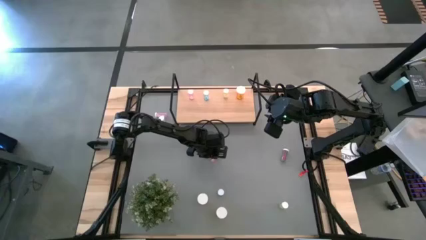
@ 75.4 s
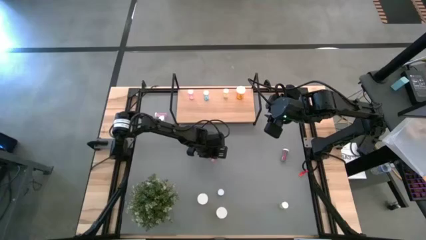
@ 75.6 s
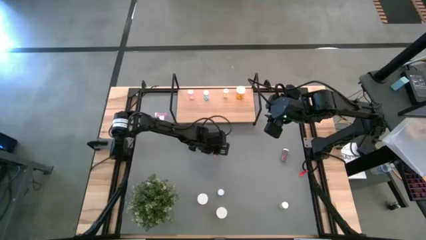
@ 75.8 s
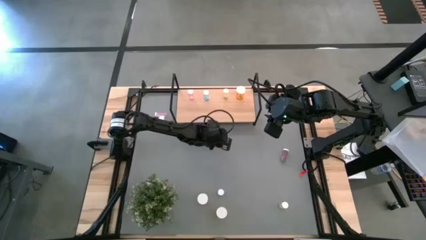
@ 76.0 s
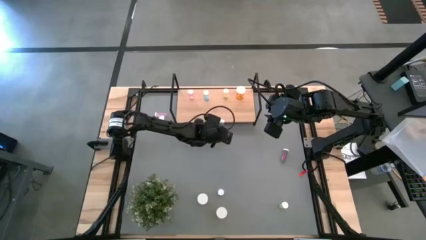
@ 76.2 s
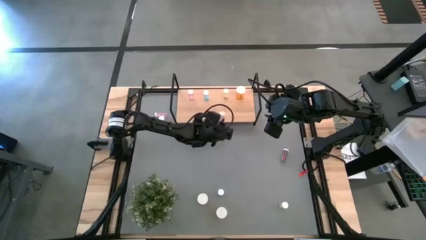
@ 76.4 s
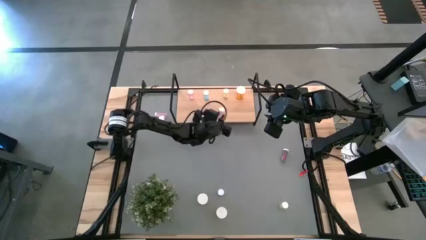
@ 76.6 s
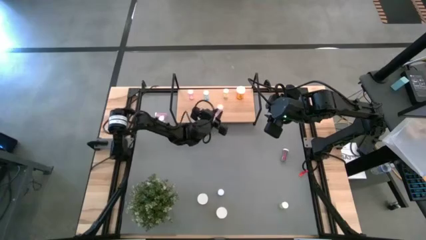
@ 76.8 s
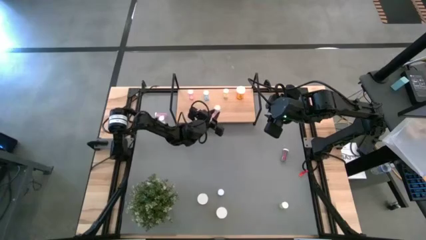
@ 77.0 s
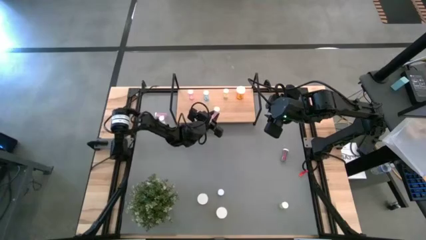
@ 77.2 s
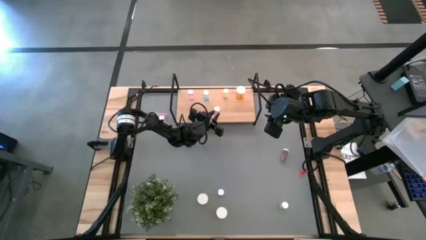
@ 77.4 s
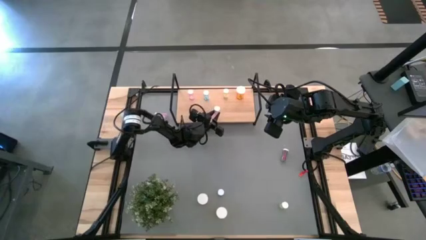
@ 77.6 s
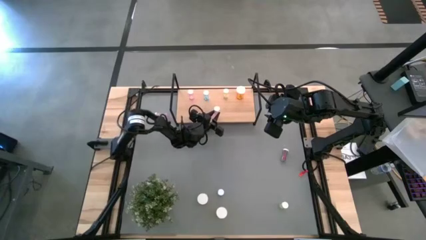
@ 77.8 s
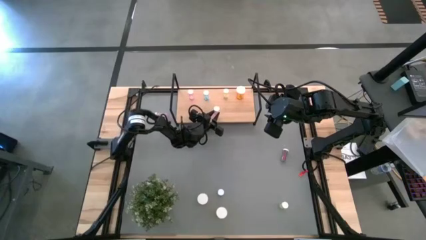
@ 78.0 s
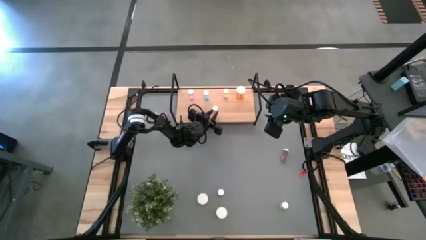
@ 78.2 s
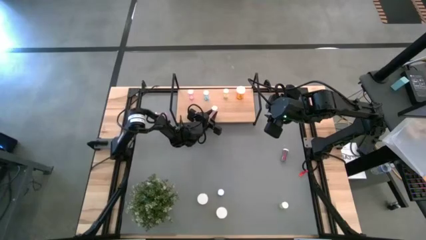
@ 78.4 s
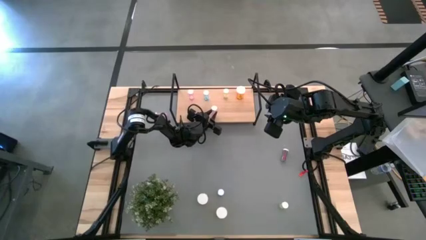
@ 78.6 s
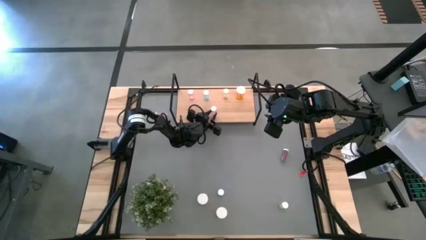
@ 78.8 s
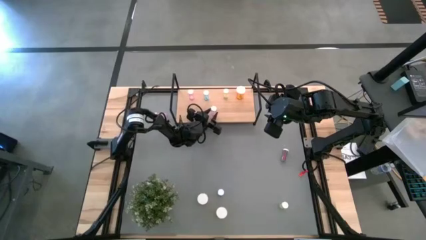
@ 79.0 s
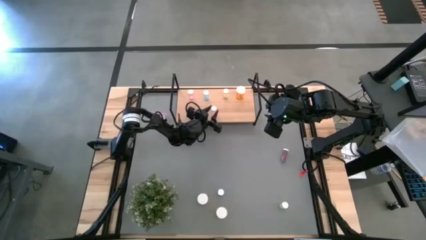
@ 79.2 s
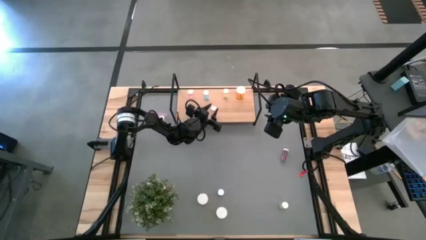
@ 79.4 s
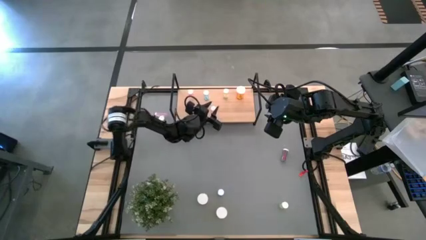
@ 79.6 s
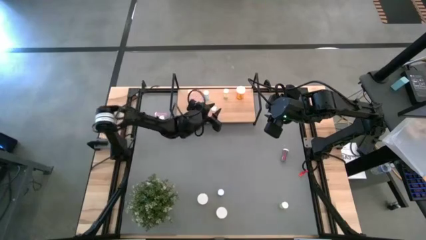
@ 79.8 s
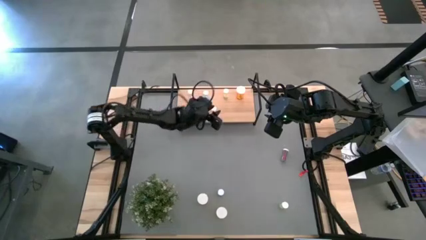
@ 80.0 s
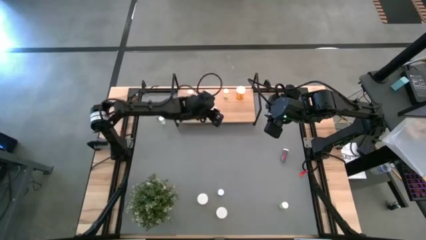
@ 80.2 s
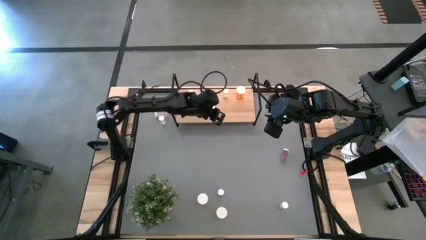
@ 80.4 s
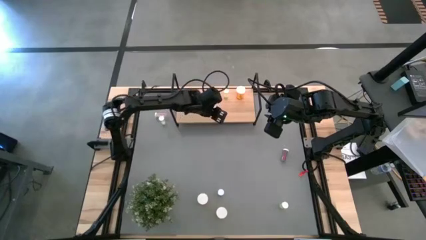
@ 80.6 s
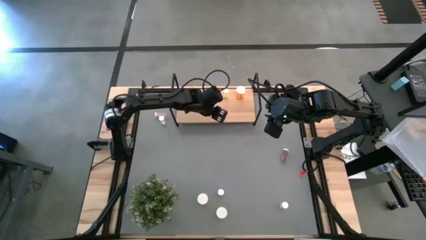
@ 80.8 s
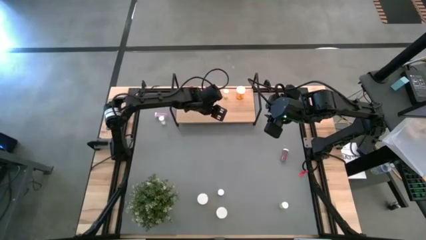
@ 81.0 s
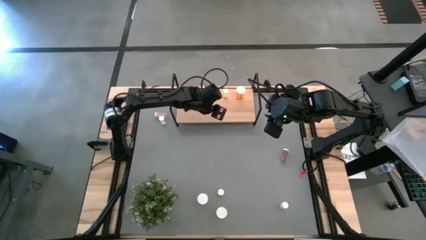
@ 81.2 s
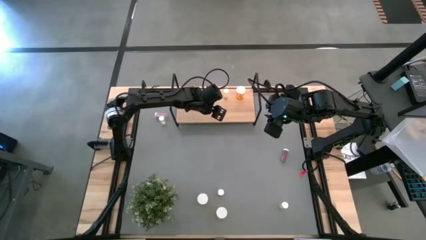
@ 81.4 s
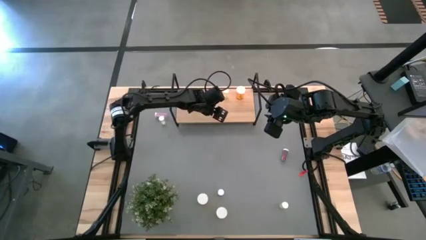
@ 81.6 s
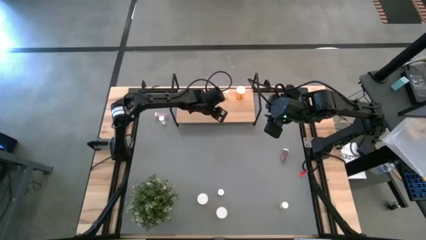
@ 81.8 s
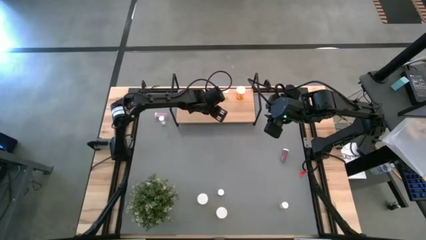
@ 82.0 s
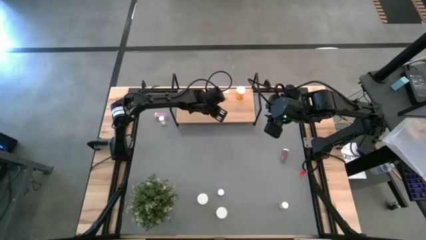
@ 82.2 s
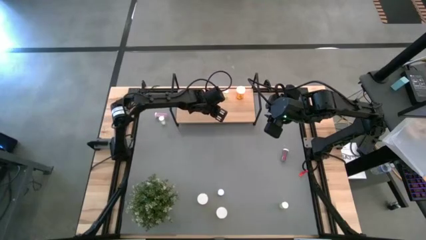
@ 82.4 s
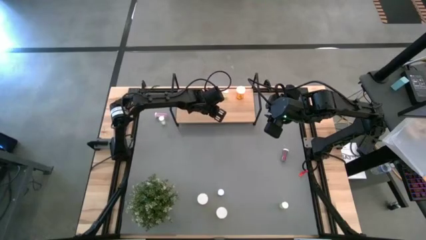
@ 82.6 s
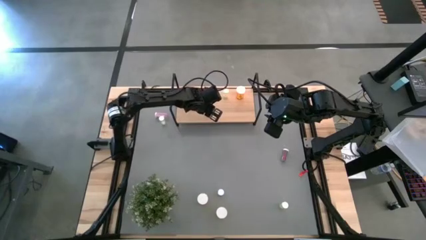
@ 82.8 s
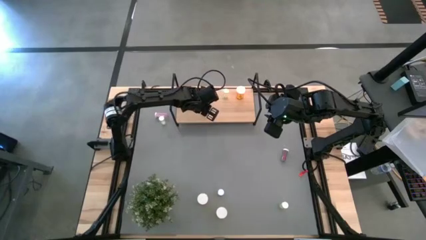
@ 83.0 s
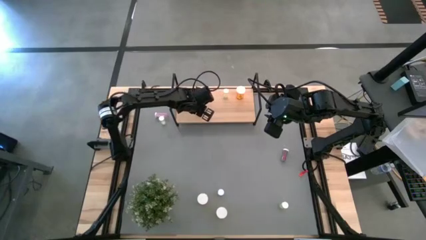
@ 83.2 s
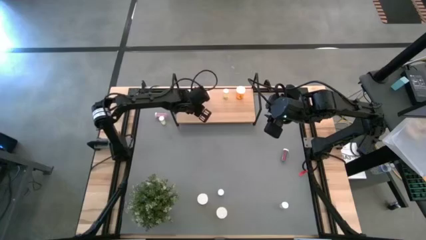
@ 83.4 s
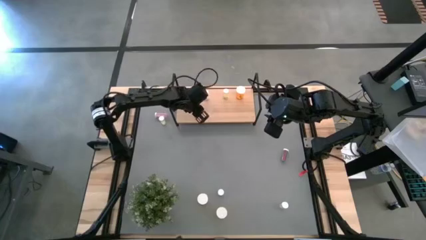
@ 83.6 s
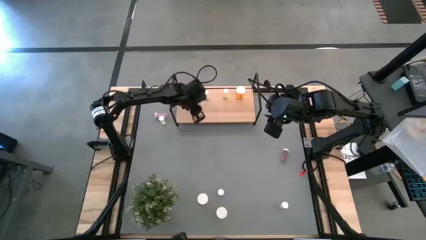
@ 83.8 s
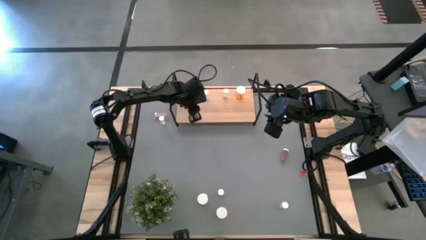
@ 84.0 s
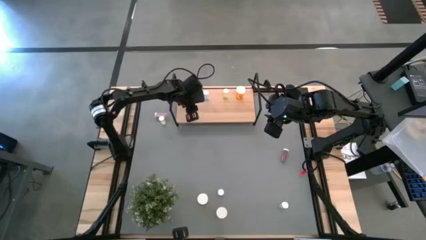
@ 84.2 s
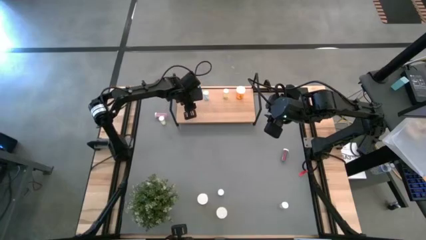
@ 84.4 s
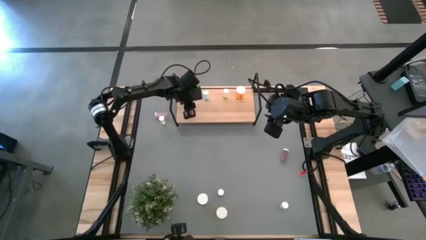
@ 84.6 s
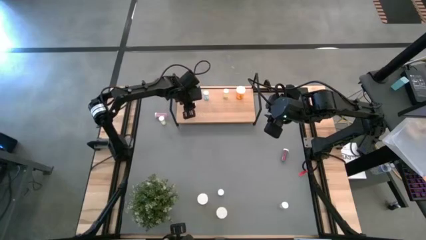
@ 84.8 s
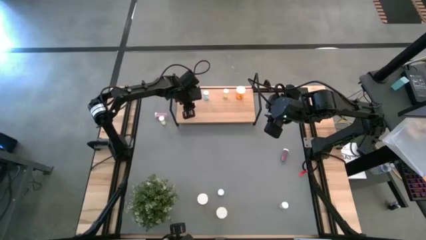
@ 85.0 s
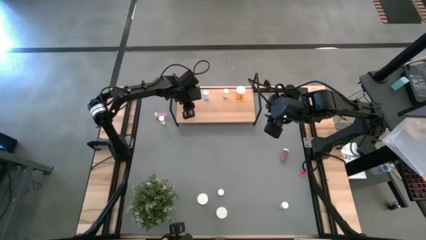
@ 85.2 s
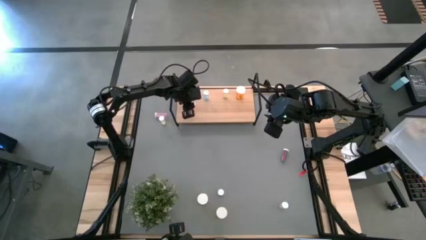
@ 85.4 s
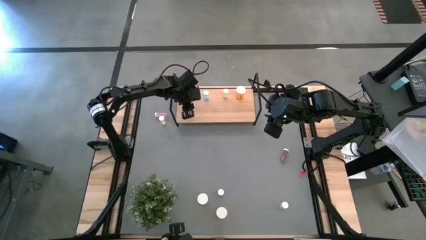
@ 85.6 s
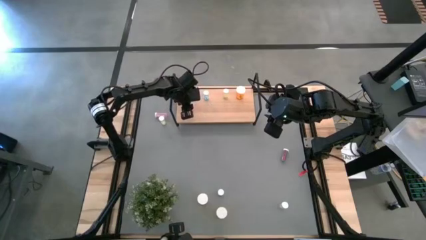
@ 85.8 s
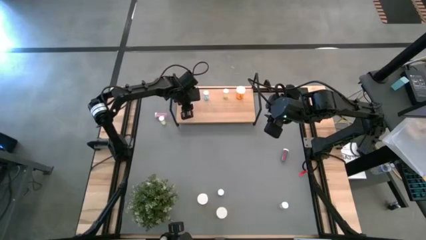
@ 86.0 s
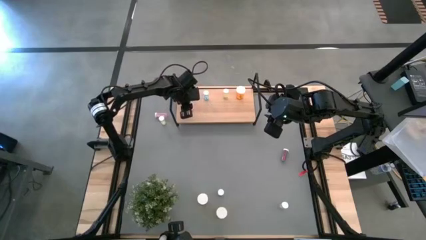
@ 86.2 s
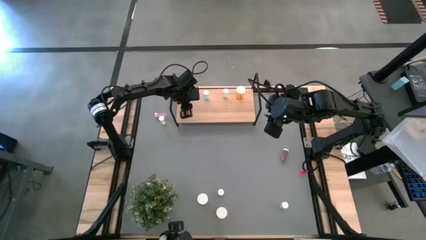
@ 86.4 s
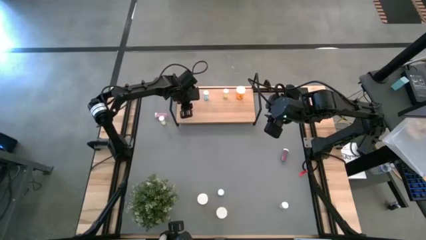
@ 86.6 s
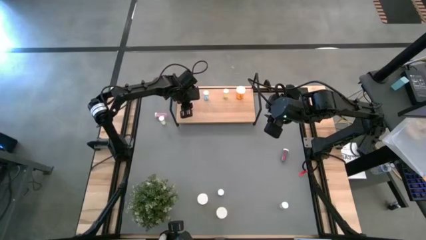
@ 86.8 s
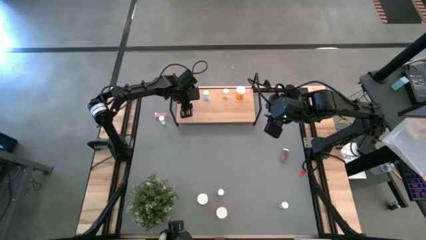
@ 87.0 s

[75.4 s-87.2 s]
Task: Pick and place medicine bottles onto shelf by color
Put the right pink pill bottle on the shelf aligned with the other pink pill bottle
